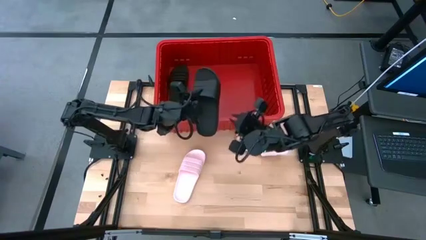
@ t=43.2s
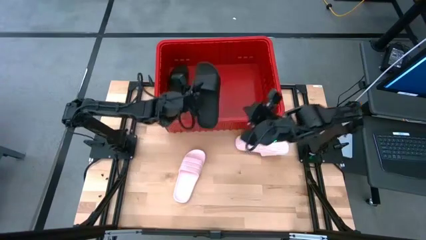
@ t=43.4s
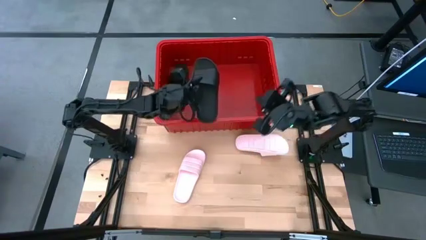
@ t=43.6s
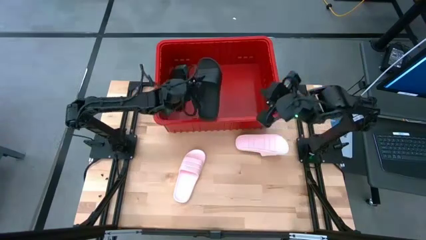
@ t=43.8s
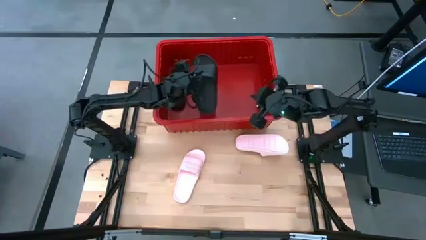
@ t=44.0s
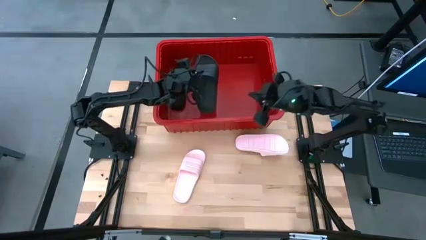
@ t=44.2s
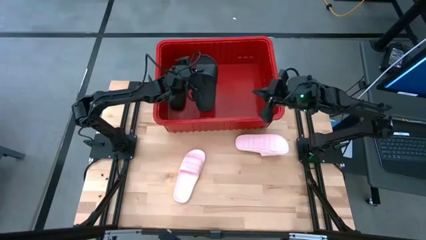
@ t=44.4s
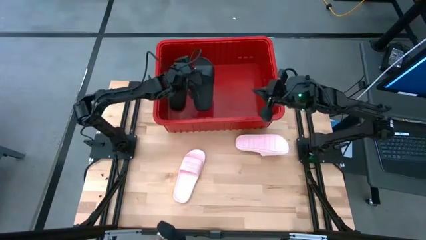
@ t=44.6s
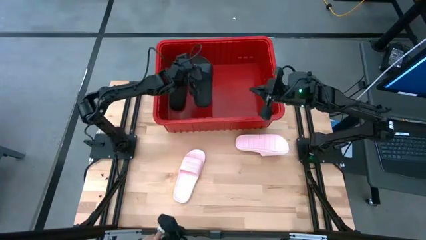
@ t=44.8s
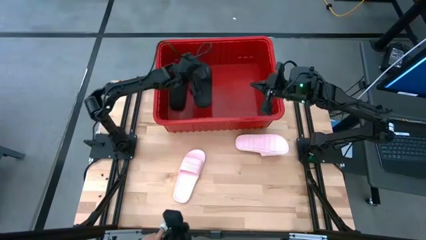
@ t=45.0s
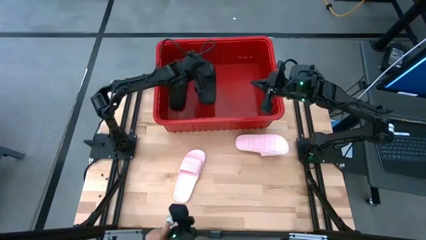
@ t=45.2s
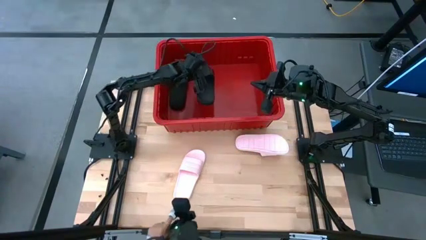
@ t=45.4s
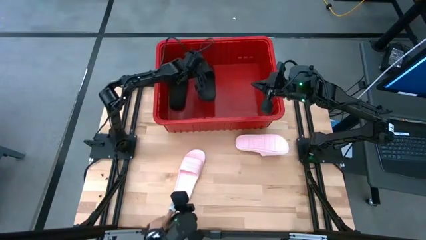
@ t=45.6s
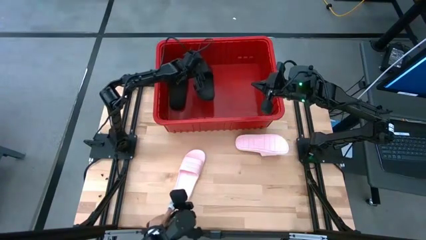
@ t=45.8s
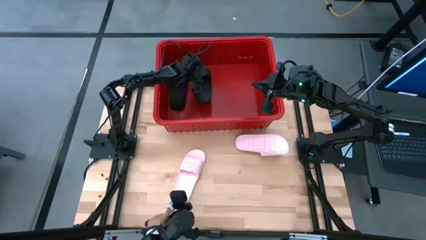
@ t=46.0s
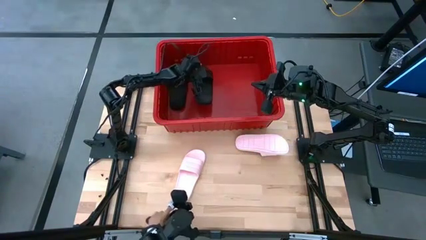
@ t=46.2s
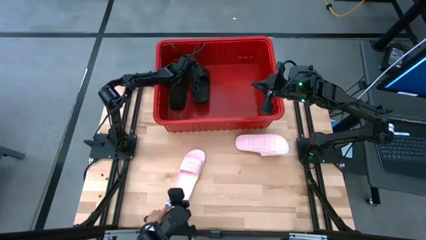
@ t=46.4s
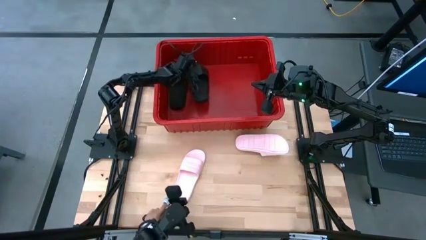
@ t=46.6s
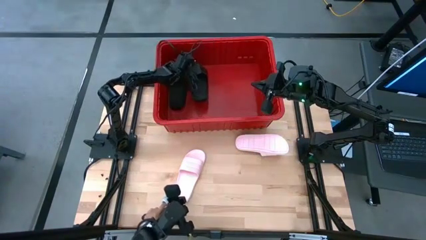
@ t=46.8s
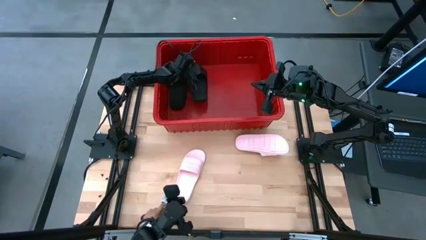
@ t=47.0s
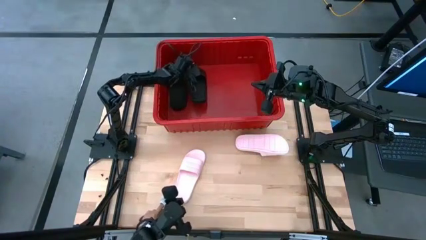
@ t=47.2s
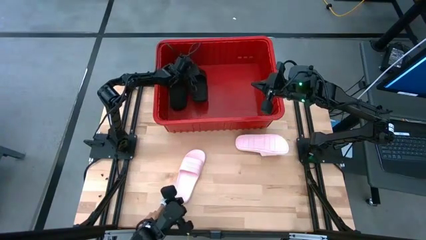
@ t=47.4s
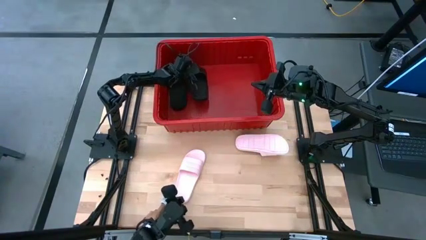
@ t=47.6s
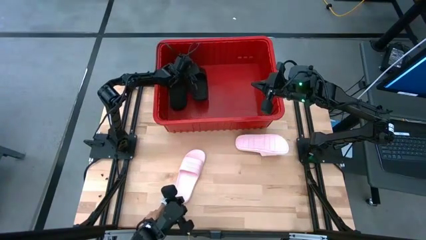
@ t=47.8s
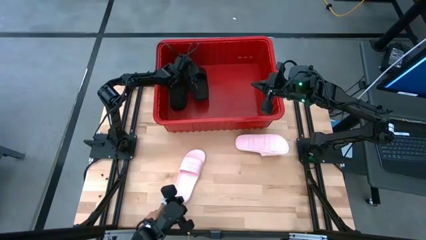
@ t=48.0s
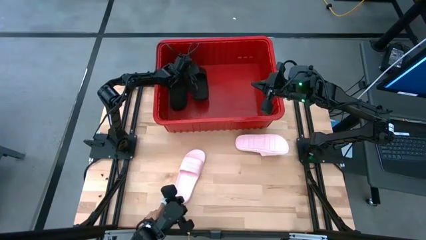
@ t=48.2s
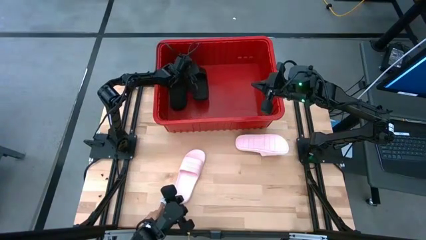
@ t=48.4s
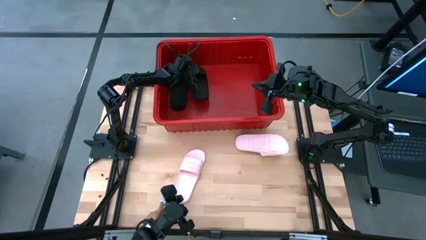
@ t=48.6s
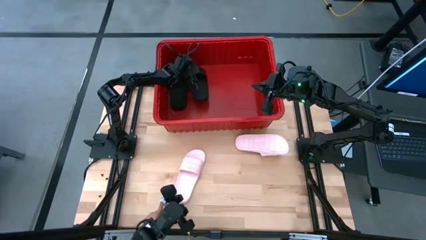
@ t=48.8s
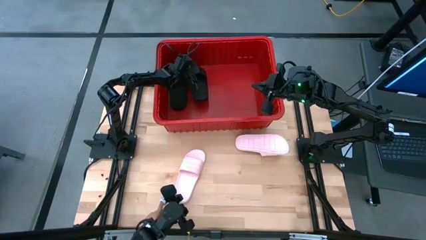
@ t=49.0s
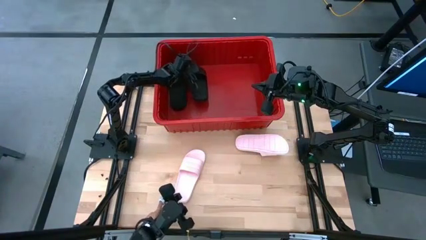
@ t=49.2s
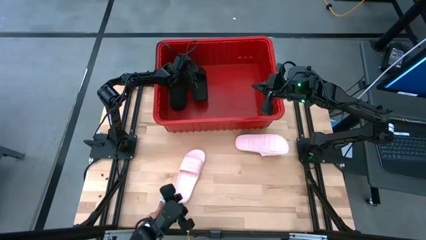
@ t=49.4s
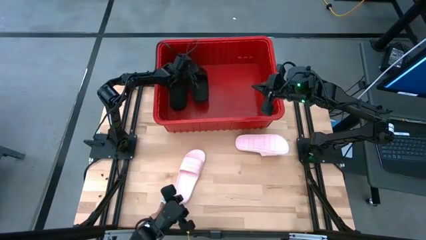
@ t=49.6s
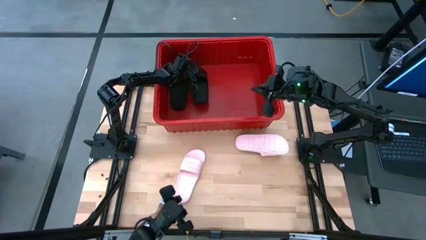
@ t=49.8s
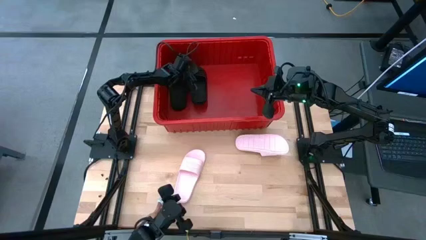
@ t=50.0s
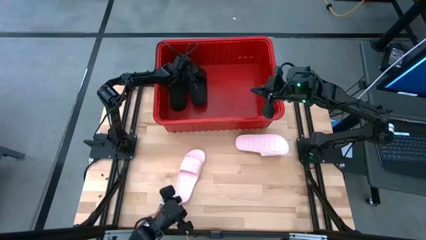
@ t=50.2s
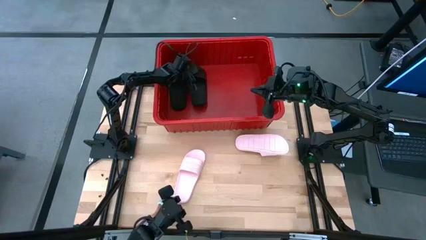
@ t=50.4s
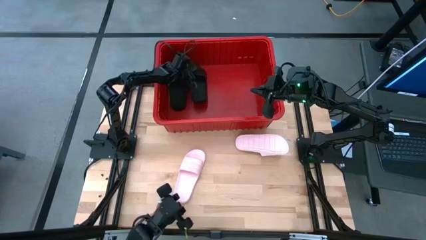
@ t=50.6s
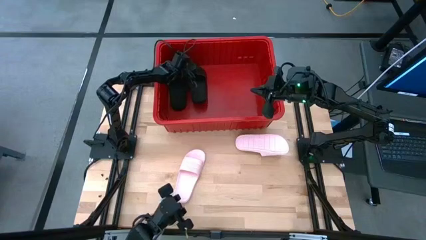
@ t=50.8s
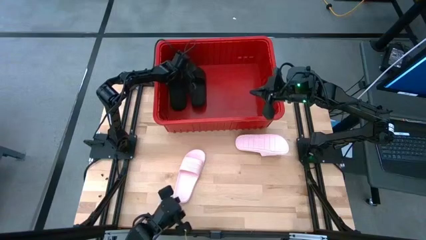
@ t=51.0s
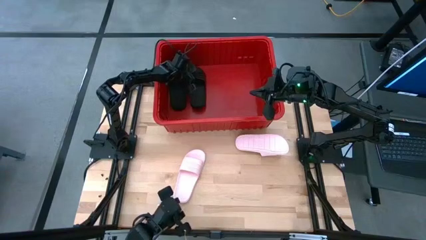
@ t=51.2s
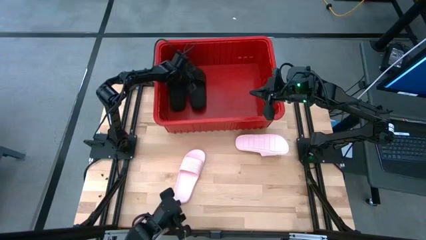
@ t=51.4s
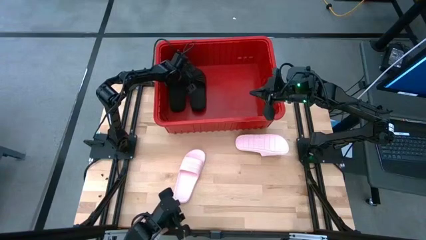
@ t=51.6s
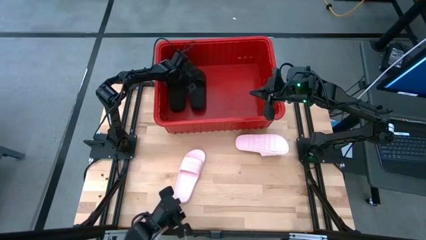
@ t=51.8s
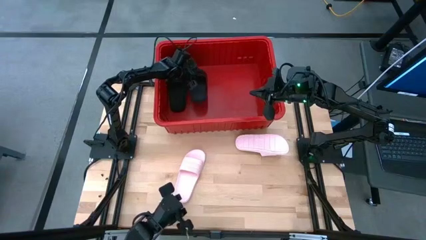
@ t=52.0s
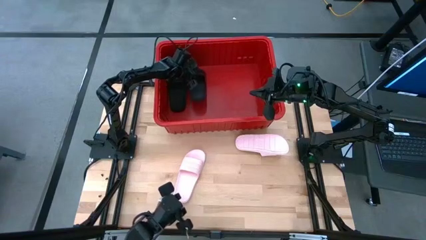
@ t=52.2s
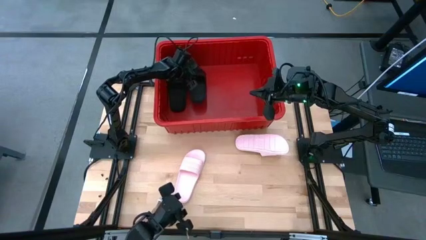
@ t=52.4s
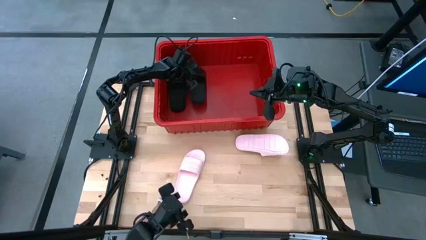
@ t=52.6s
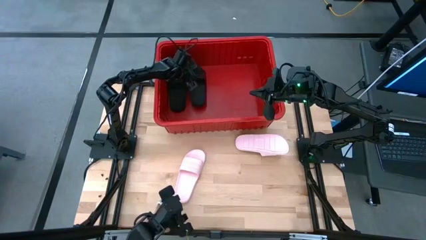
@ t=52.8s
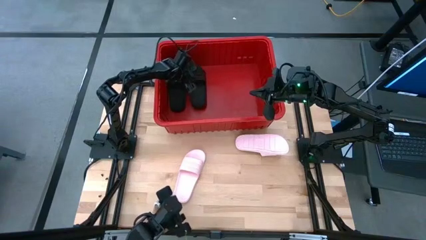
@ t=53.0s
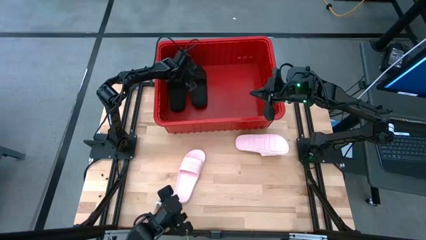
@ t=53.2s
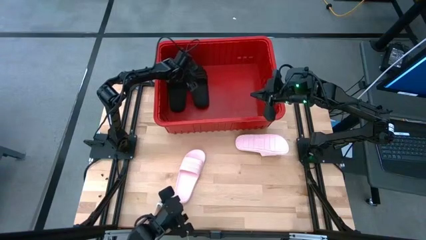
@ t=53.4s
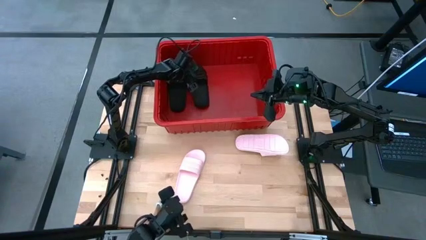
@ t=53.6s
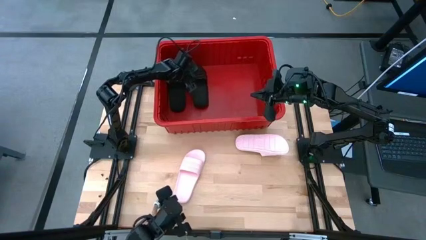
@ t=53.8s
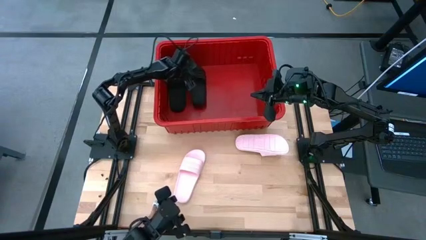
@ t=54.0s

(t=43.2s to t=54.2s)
Task: Pick and place slides into bin
Put the black slipper into the red bin

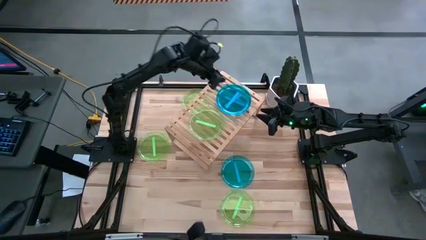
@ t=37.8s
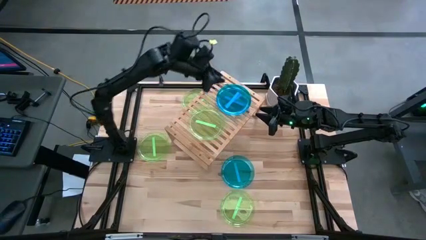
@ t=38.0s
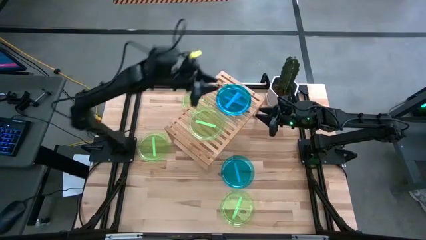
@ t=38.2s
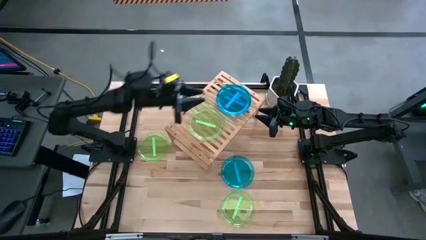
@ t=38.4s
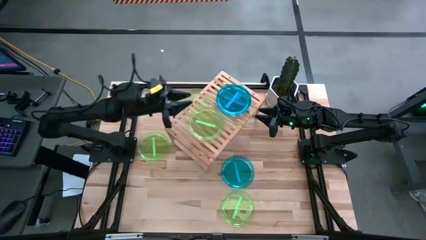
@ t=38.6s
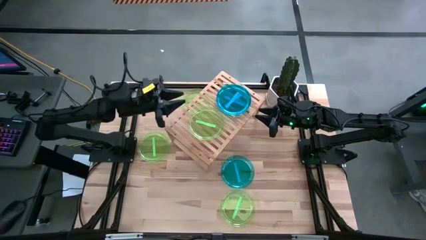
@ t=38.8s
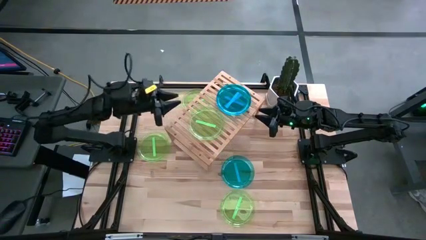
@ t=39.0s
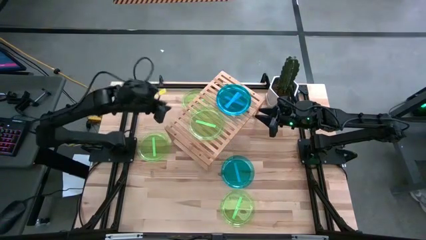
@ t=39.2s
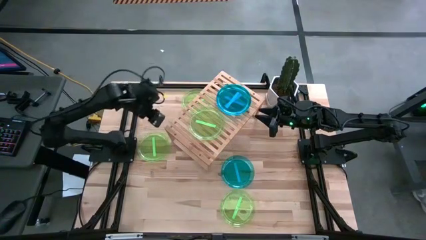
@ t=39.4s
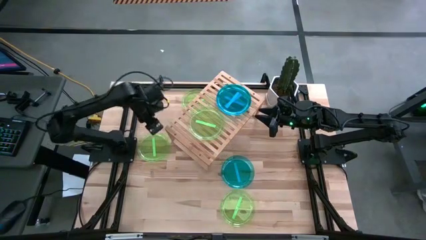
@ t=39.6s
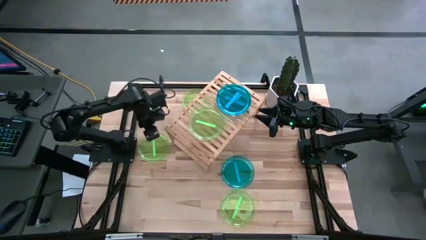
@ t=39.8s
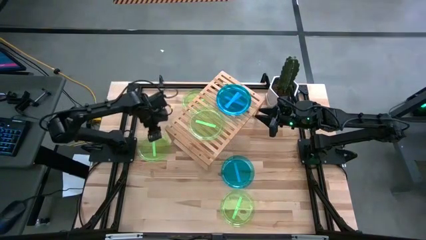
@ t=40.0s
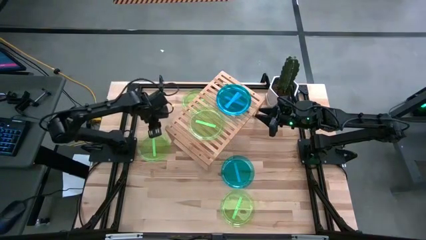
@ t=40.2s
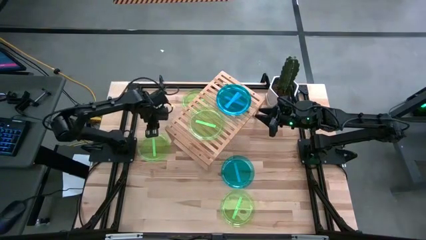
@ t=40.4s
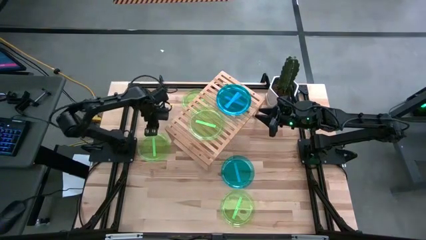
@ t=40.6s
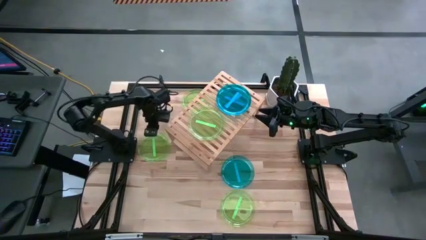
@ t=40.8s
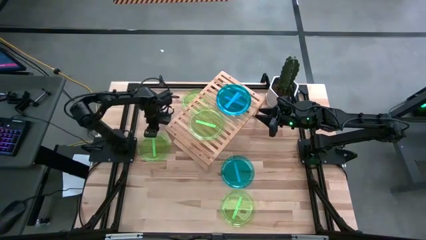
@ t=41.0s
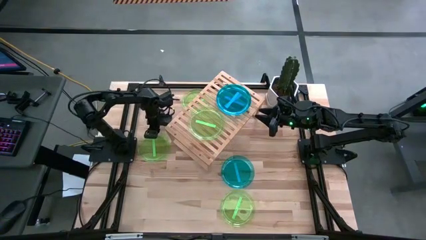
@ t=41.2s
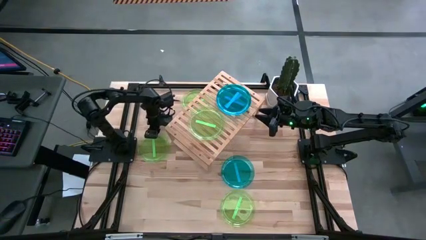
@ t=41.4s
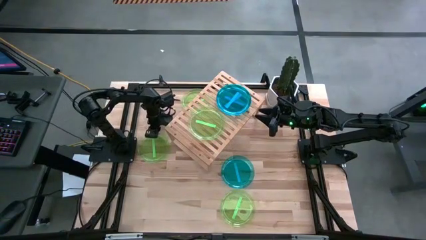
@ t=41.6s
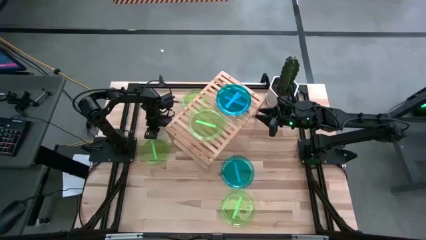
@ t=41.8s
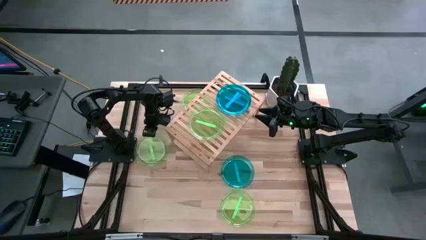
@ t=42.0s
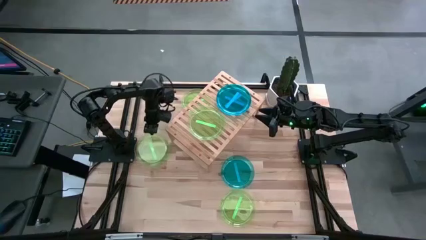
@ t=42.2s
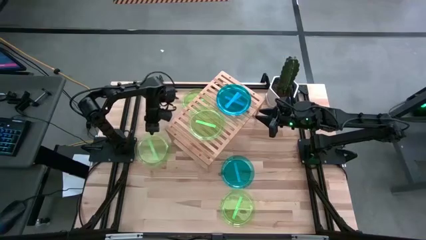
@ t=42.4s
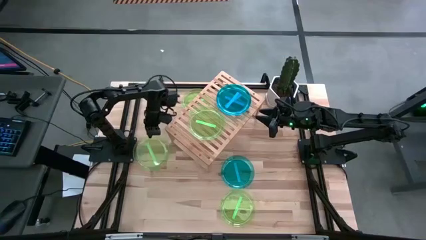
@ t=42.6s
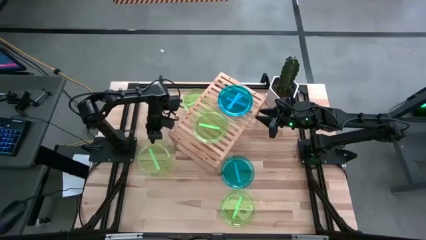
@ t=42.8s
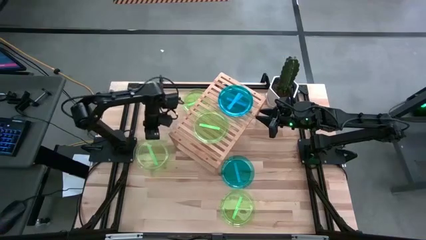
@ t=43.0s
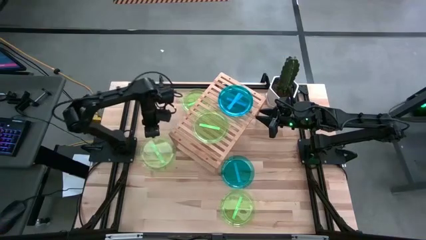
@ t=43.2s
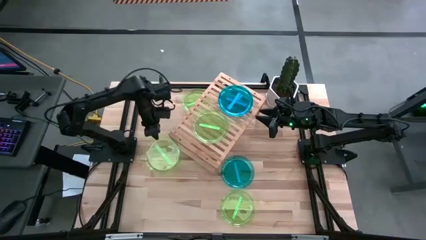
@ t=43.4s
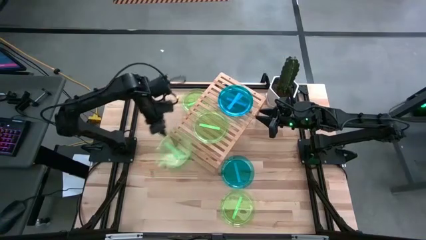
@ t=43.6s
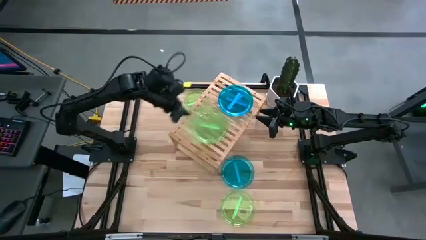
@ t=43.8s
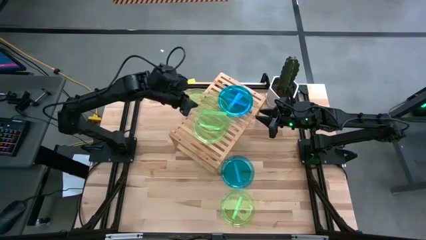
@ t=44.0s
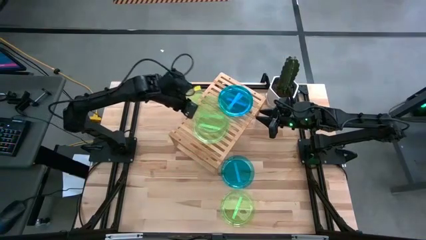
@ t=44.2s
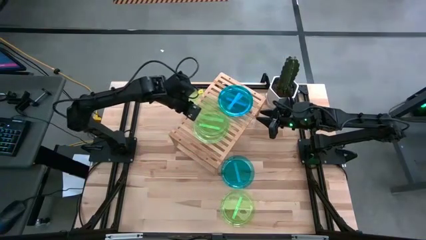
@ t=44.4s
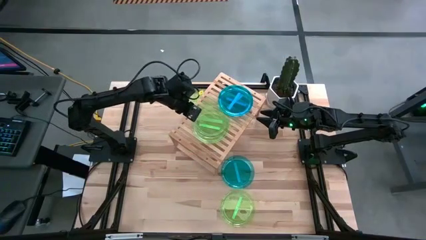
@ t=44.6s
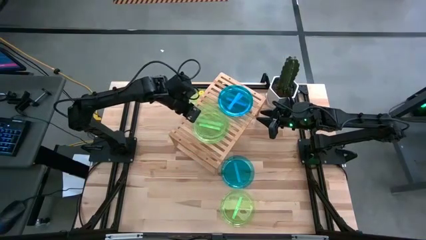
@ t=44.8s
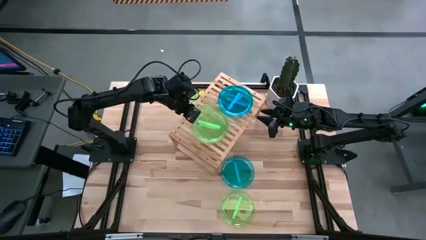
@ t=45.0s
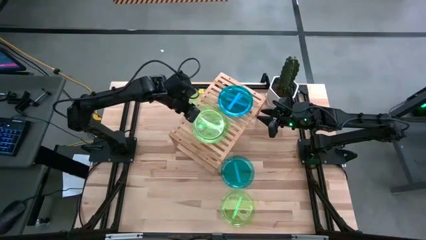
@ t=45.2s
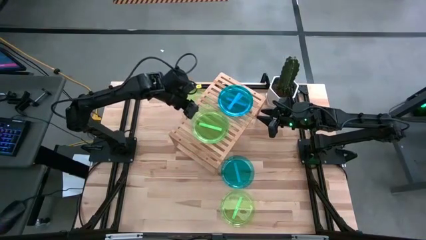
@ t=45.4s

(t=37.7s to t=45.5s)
Task: Place and stack plates onto a shelf
Stack the middle green plate on top of the green plate on the shelf
